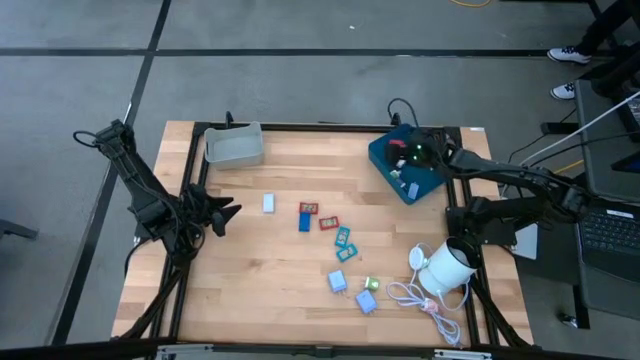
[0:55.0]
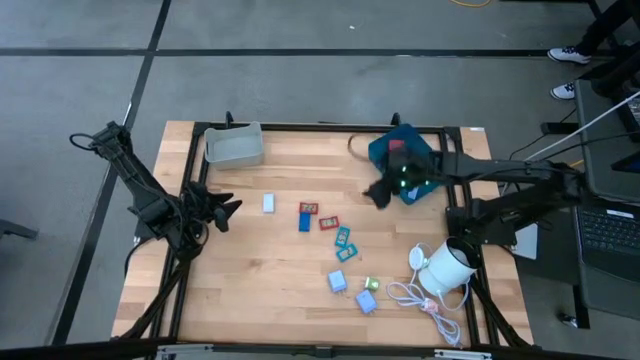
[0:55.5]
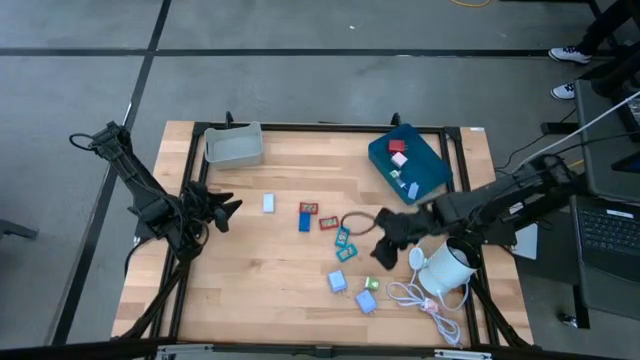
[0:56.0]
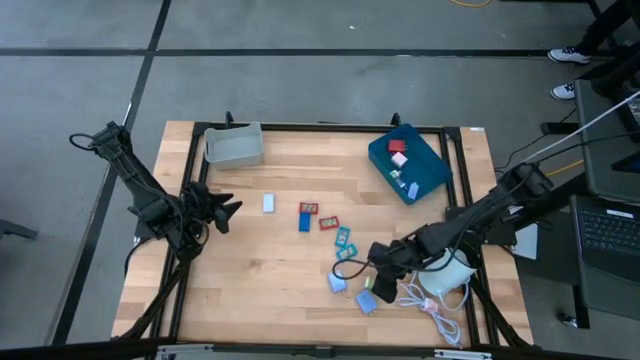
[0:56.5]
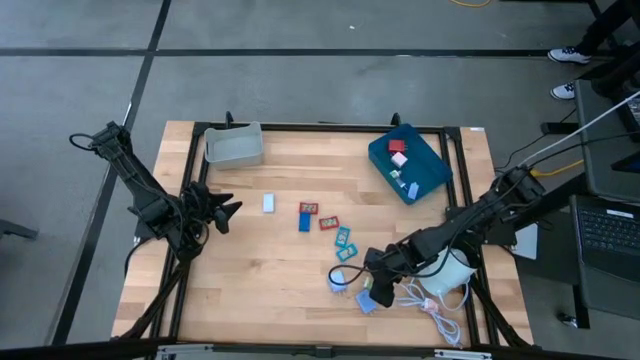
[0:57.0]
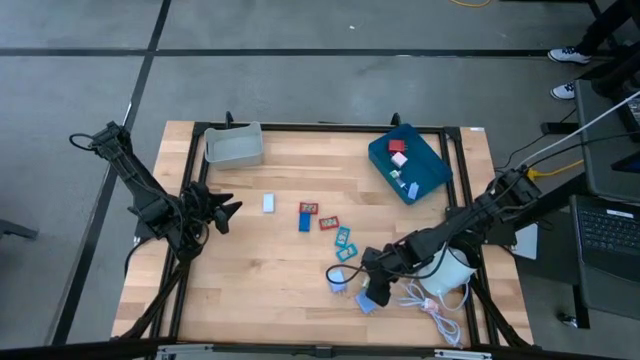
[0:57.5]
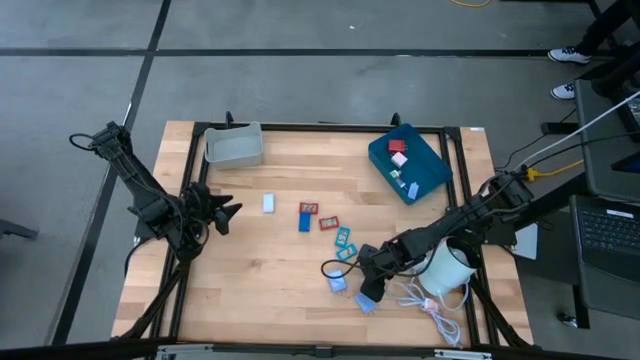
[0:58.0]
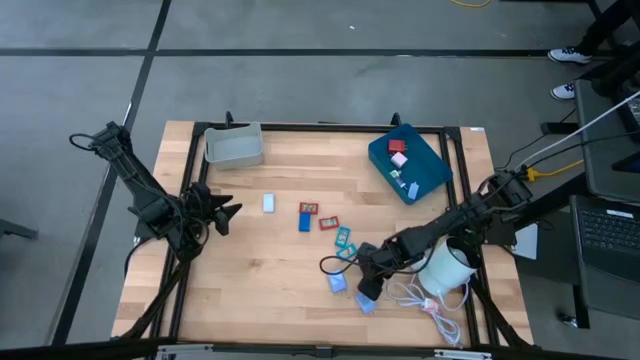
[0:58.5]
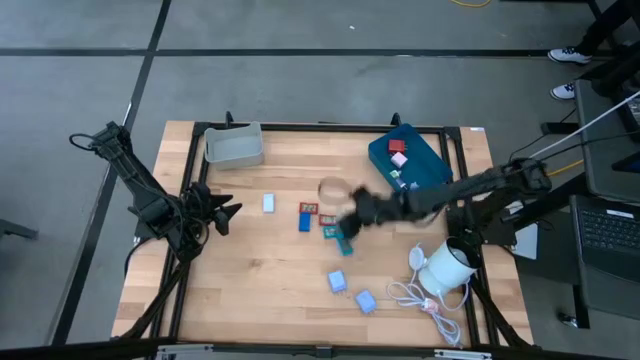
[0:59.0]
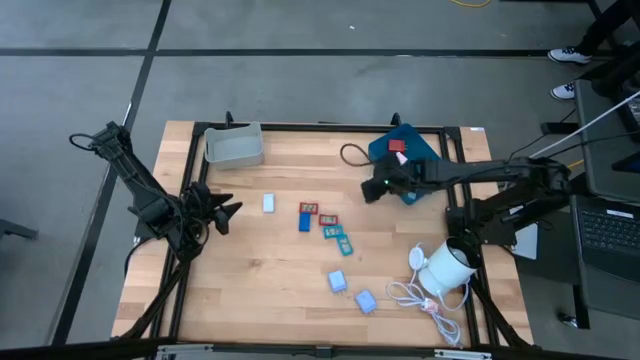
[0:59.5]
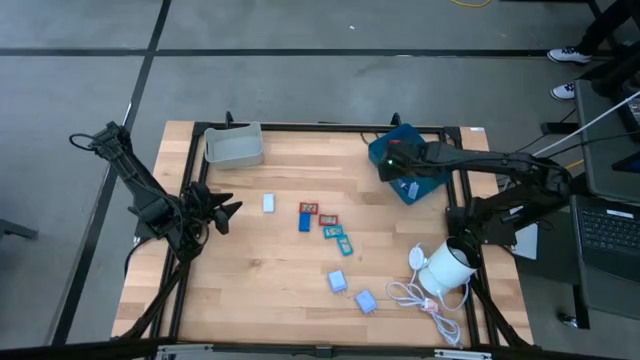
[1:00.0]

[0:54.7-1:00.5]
Task: Pick & Place Office items
Put the green charger adapter into the blue bin

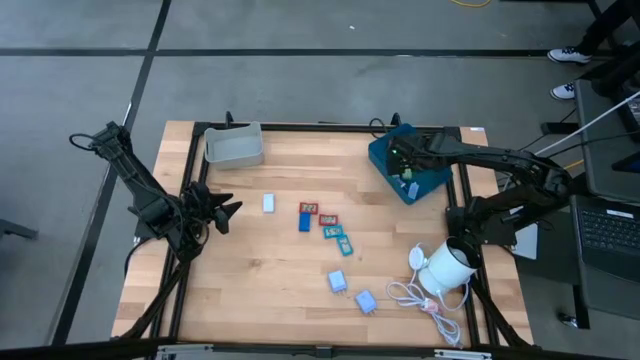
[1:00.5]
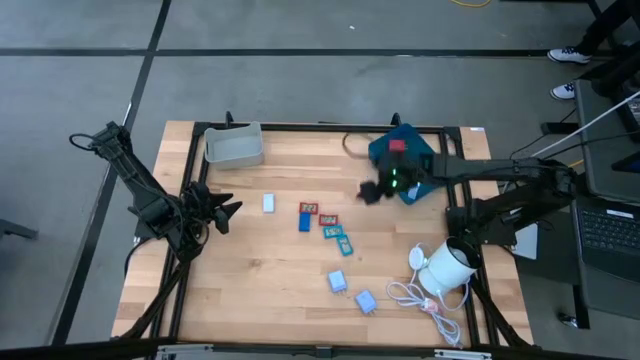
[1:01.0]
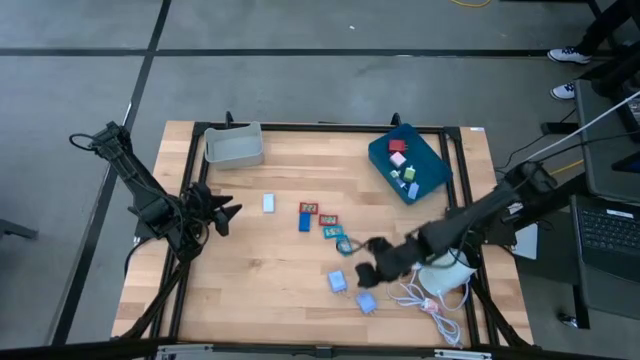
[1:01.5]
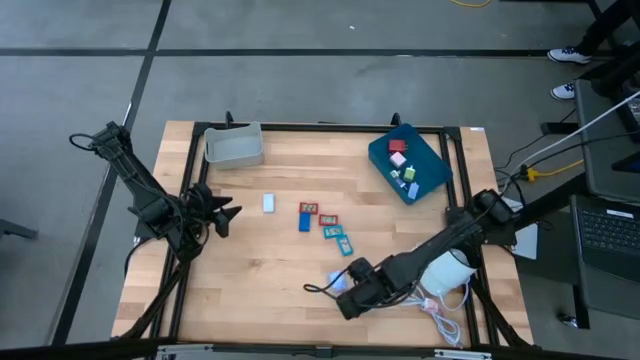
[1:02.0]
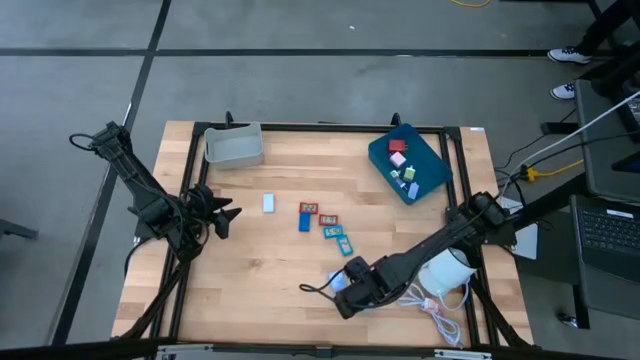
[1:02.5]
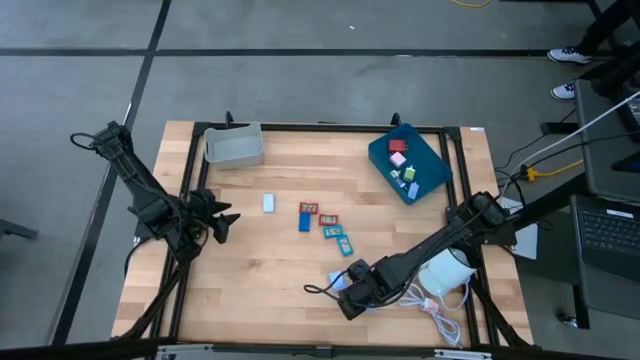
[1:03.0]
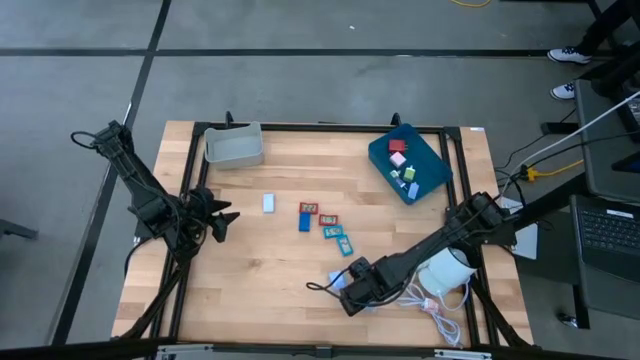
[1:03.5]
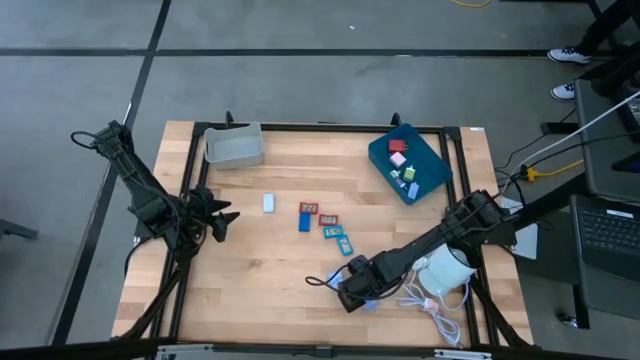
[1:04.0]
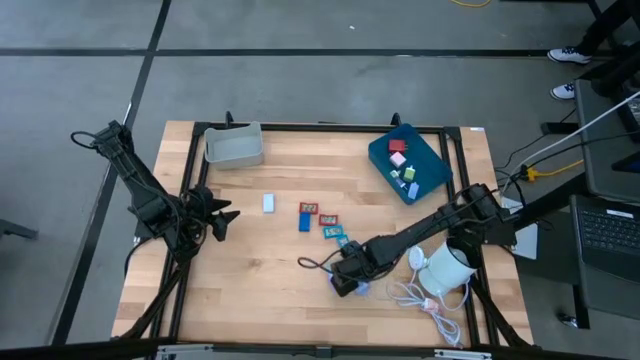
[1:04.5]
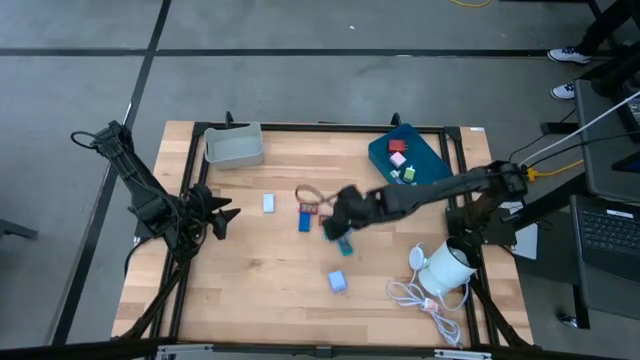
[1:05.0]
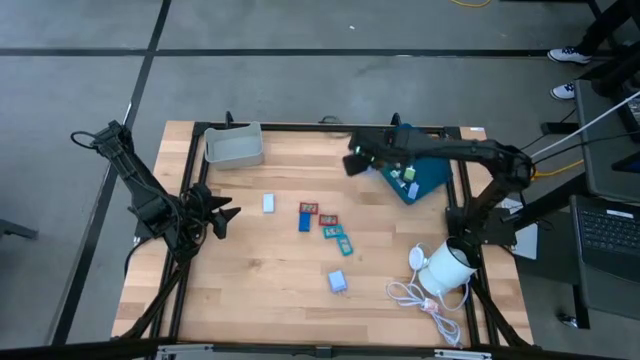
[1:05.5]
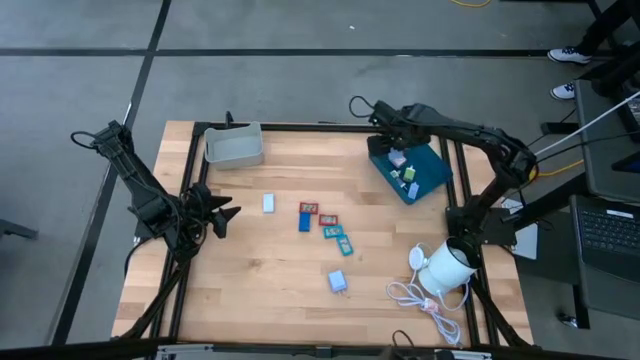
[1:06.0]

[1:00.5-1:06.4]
Put the bottom sky blue charger adapter into the blue bin

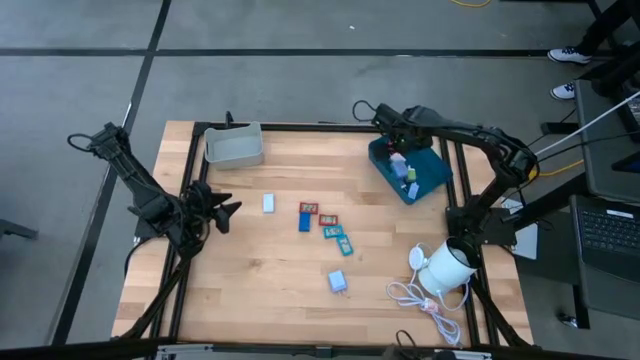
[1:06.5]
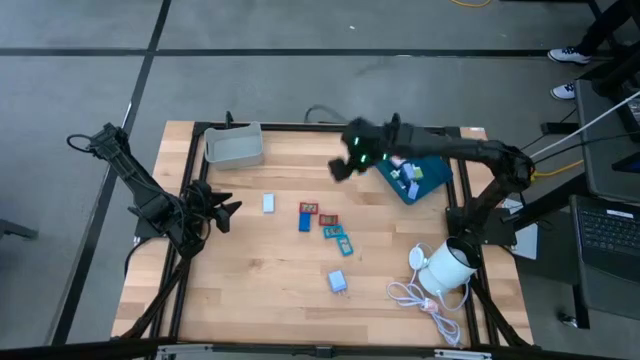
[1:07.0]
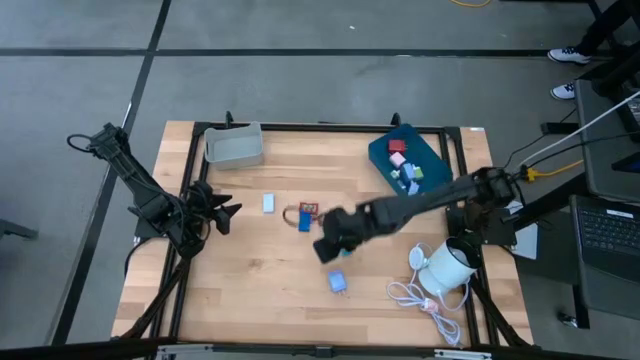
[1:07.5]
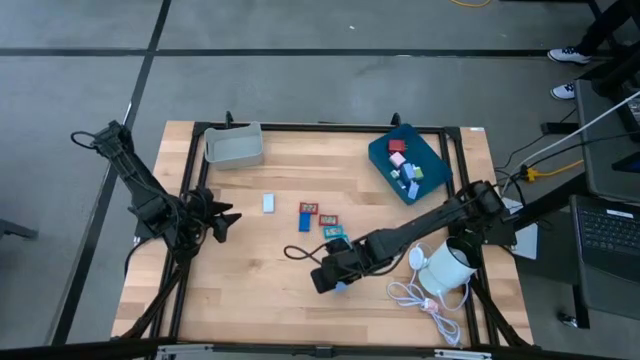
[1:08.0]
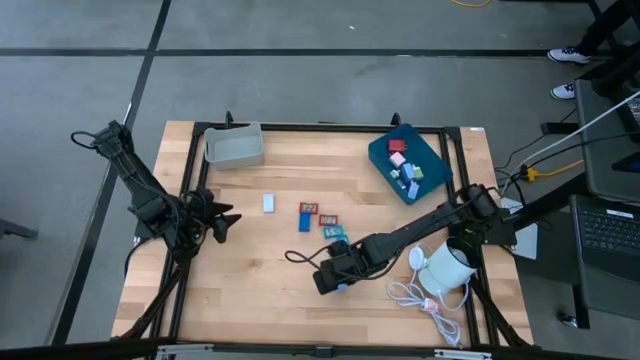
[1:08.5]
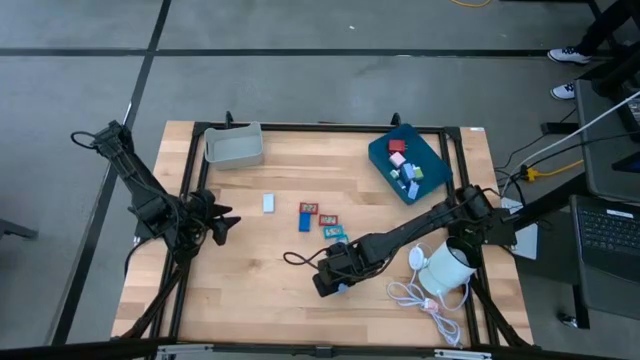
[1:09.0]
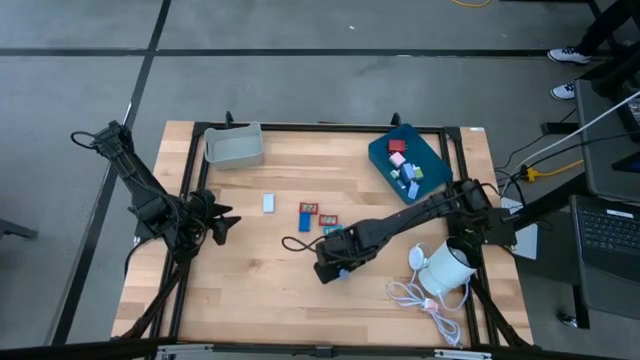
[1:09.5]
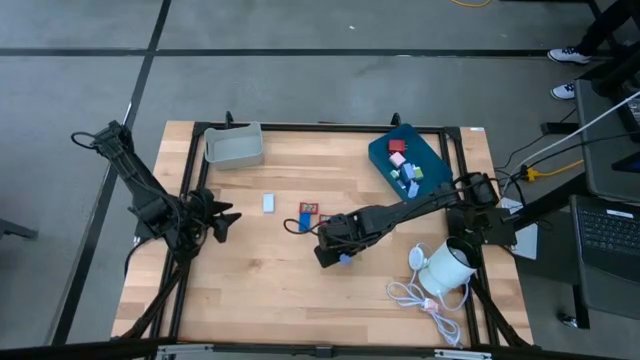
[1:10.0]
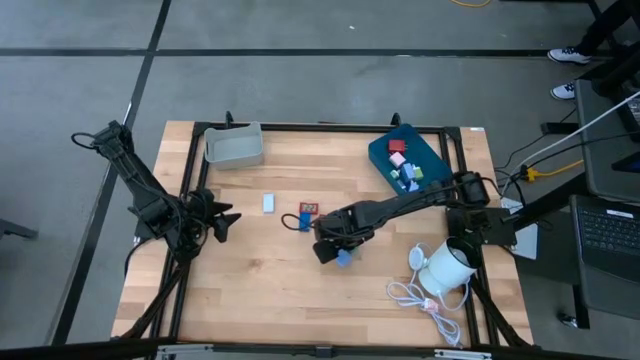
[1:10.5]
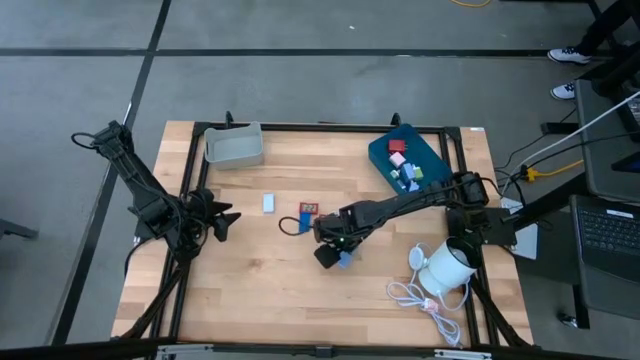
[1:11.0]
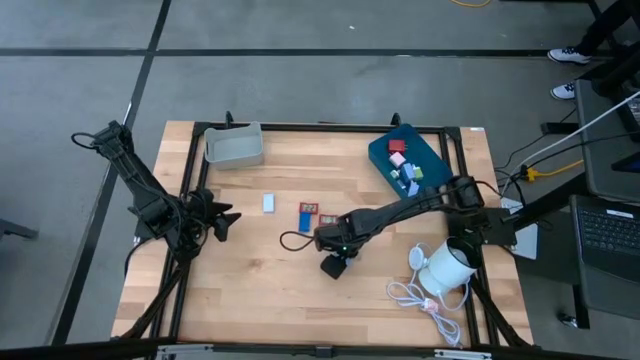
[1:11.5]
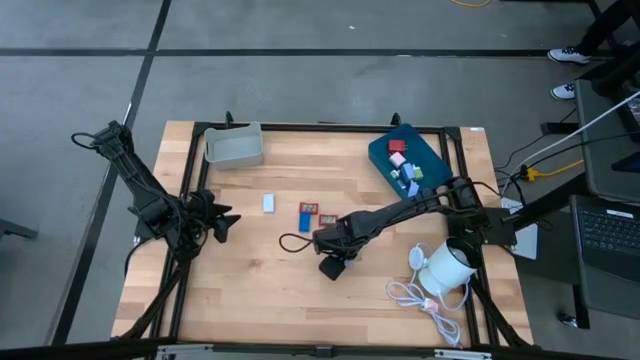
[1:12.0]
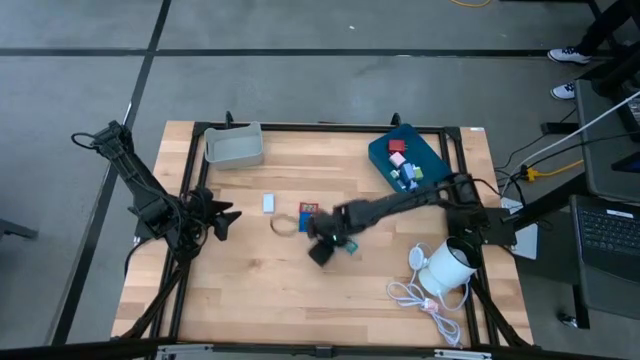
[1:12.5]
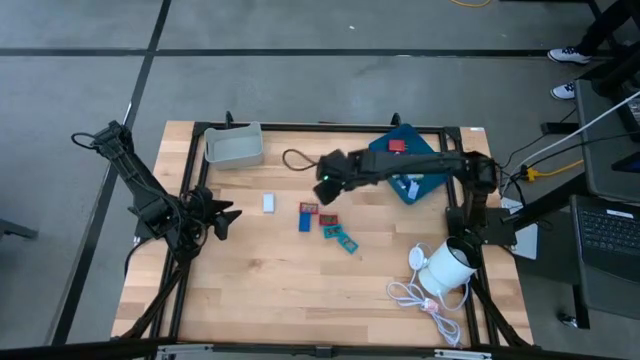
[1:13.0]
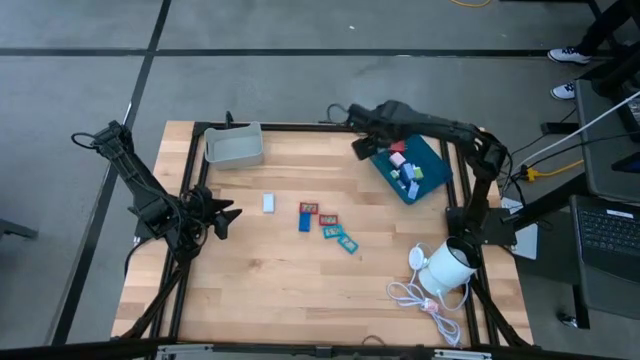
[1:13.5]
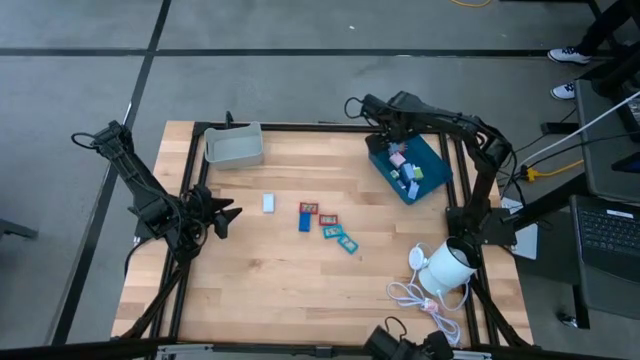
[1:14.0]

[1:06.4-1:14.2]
Put the sky blue charger adapter into the blue bin

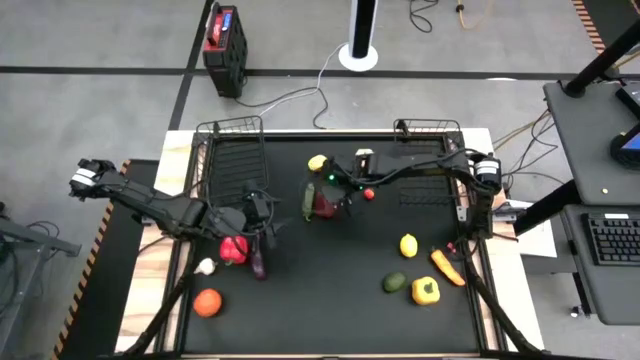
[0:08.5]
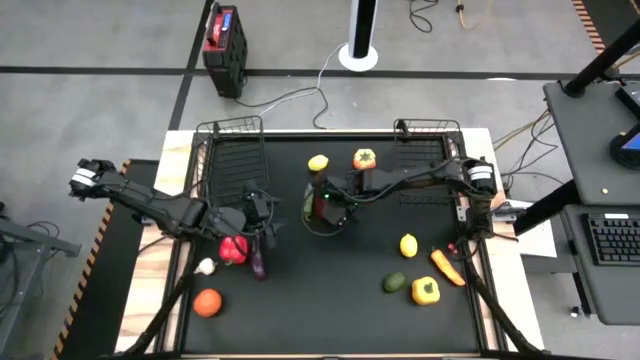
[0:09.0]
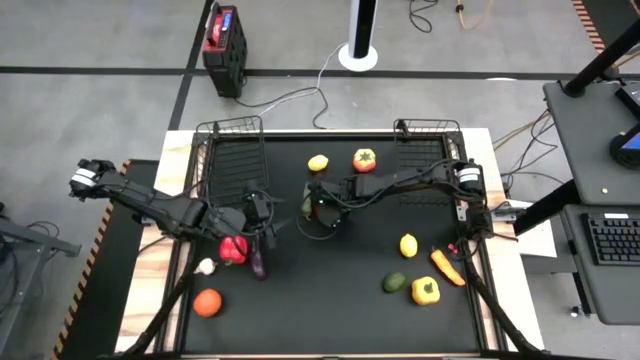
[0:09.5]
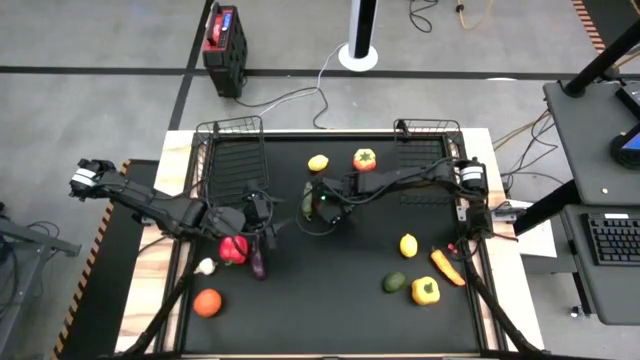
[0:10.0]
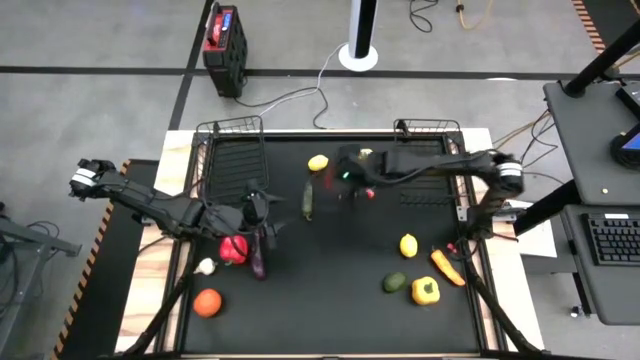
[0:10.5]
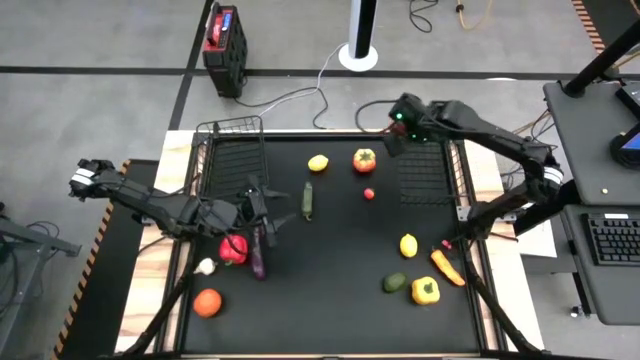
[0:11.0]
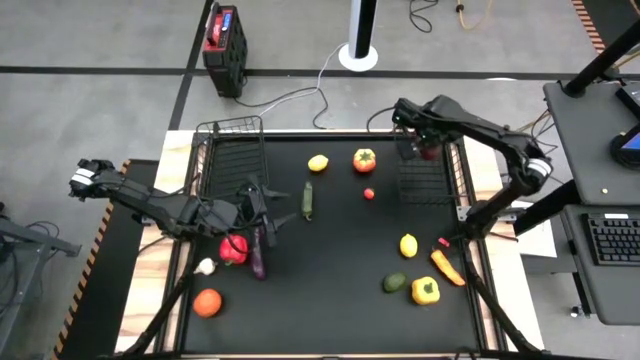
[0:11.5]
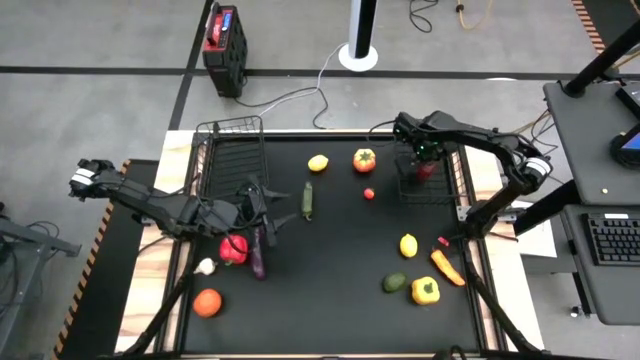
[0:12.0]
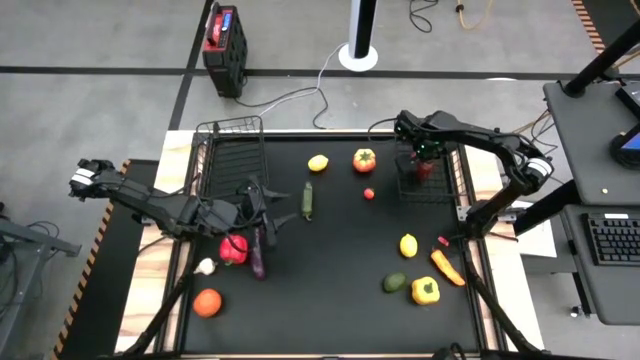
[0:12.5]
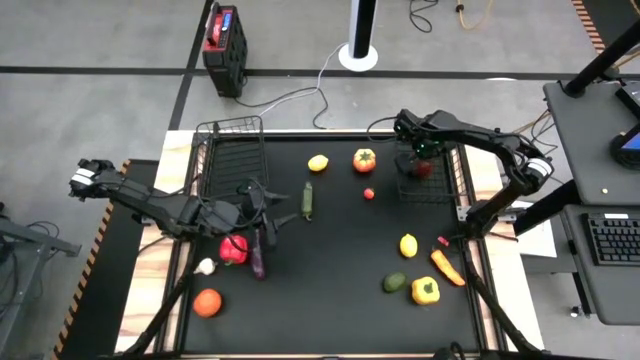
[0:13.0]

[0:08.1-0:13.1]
Task: Sort produce into baskets
Put the red apple into the right wire basket
